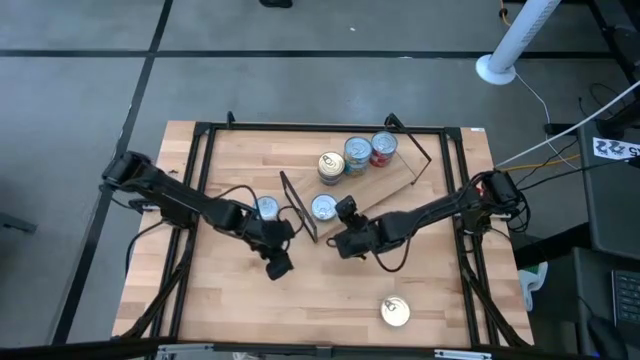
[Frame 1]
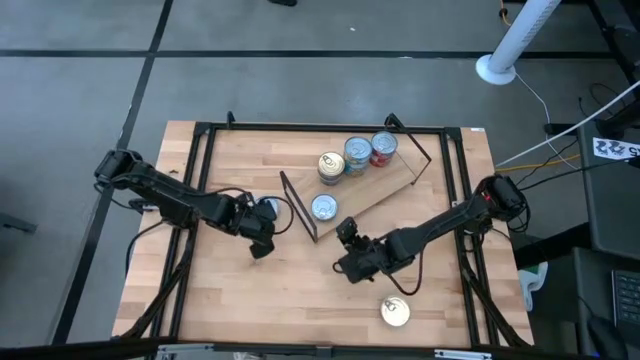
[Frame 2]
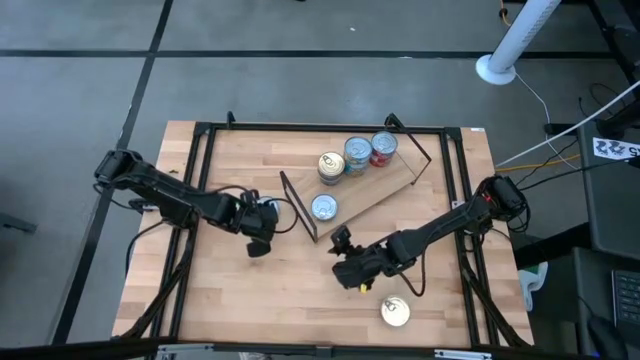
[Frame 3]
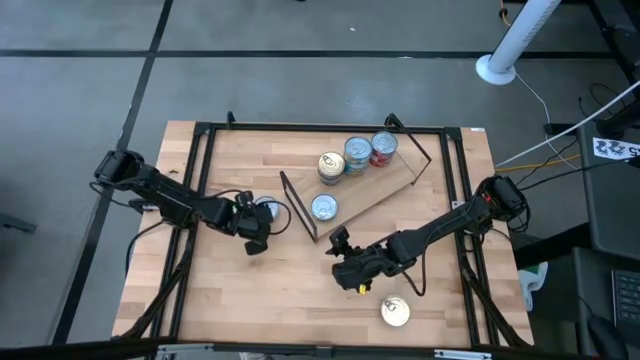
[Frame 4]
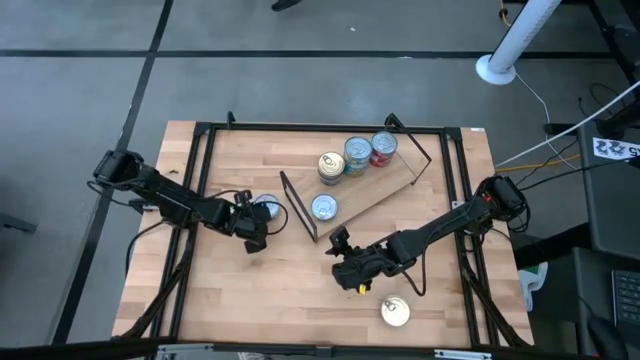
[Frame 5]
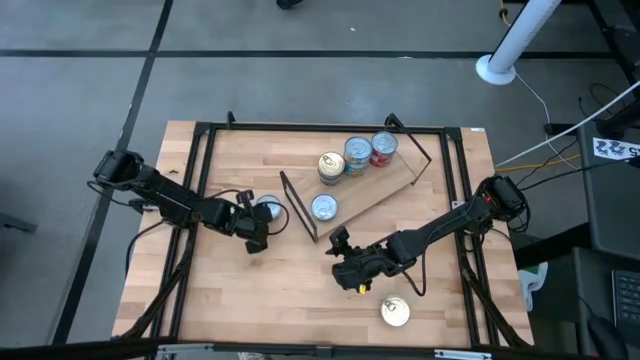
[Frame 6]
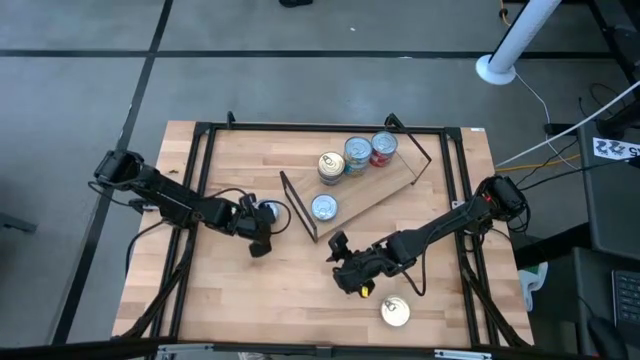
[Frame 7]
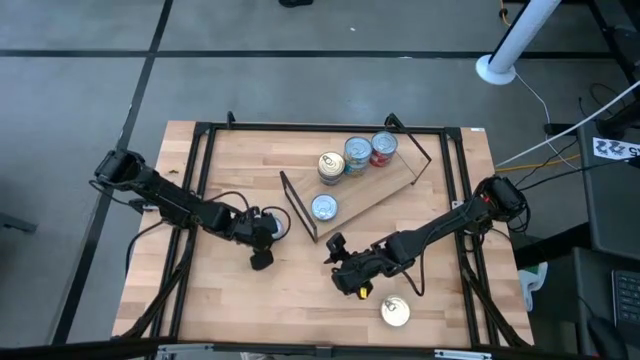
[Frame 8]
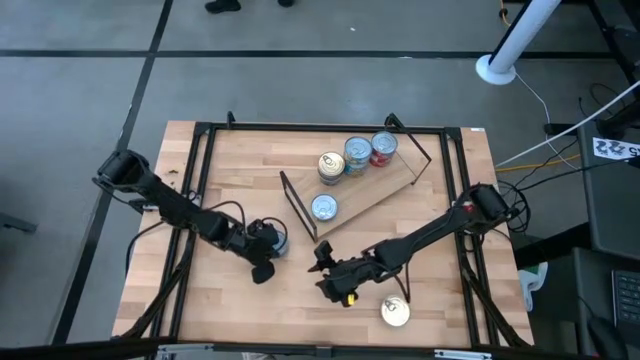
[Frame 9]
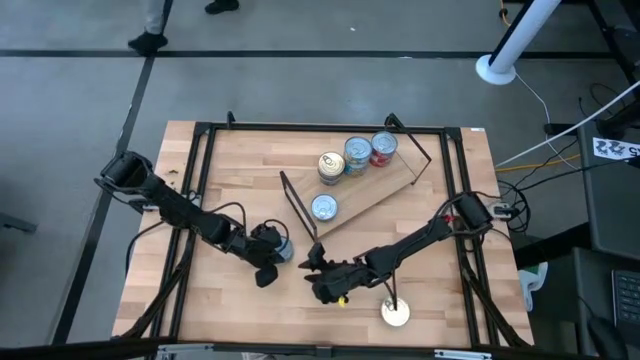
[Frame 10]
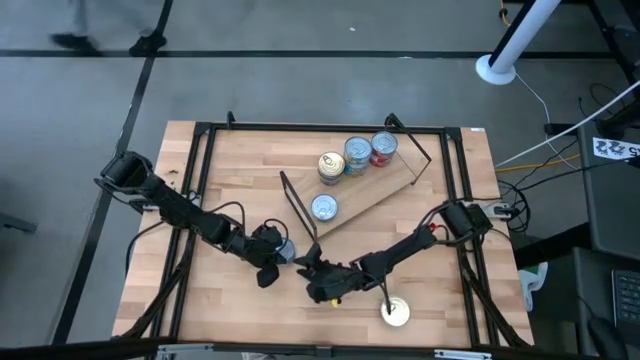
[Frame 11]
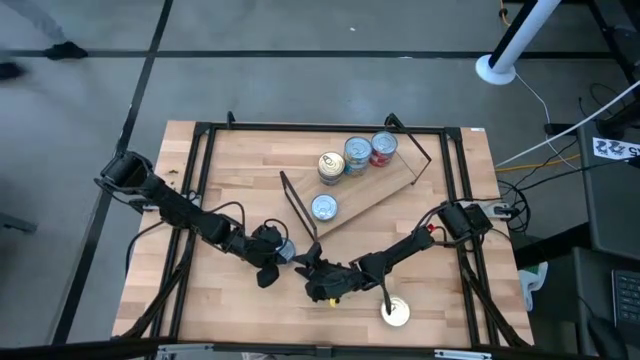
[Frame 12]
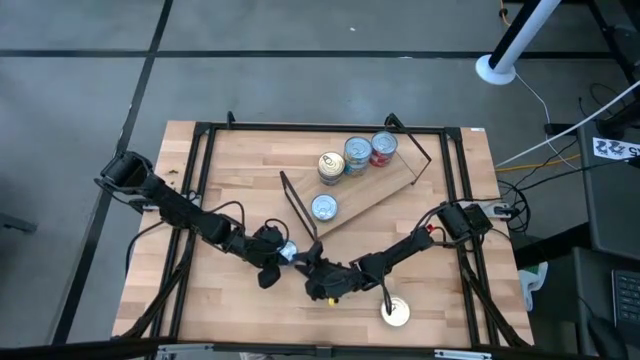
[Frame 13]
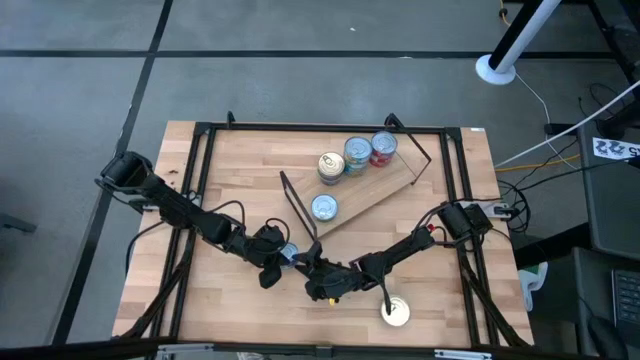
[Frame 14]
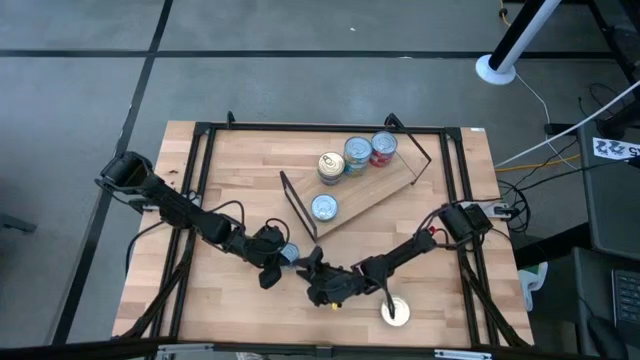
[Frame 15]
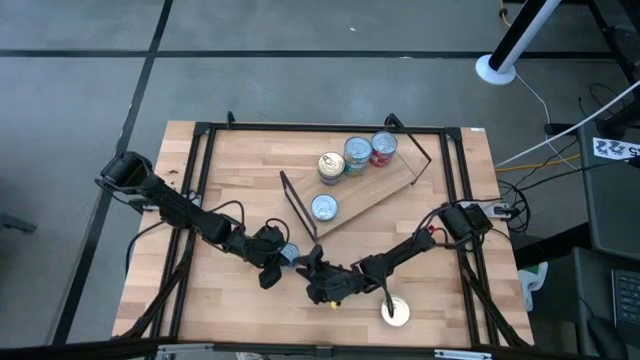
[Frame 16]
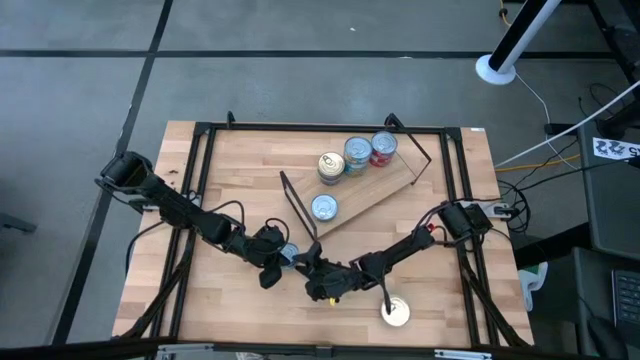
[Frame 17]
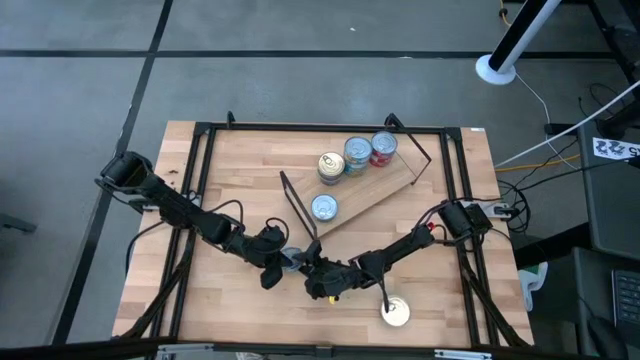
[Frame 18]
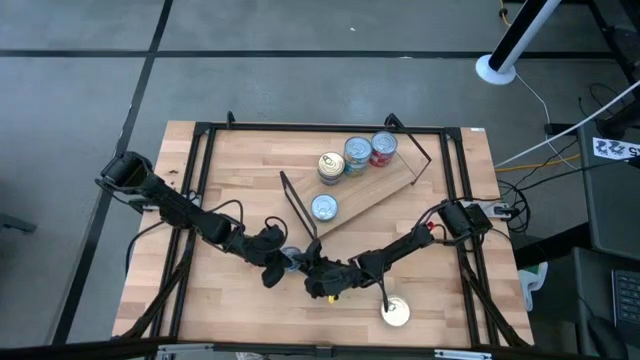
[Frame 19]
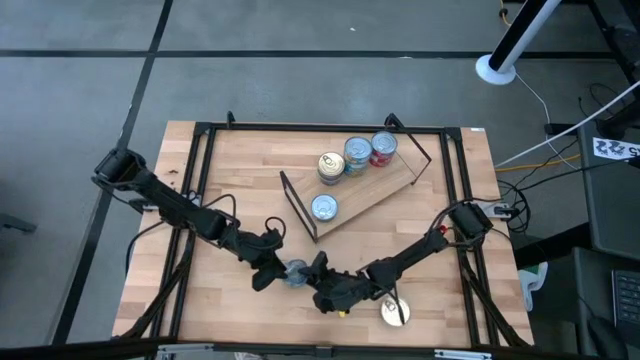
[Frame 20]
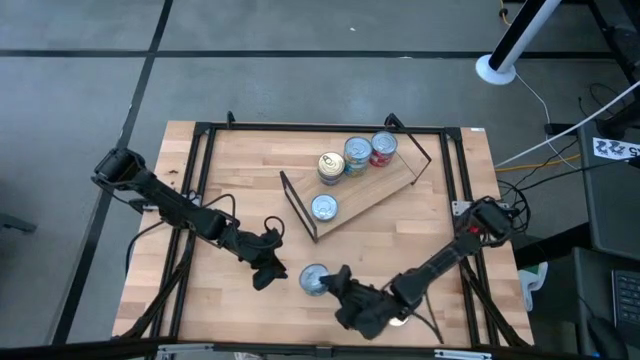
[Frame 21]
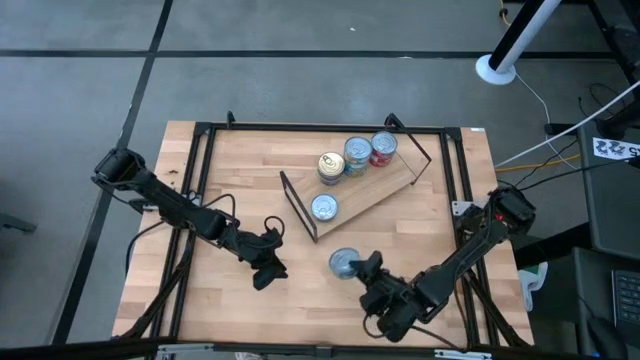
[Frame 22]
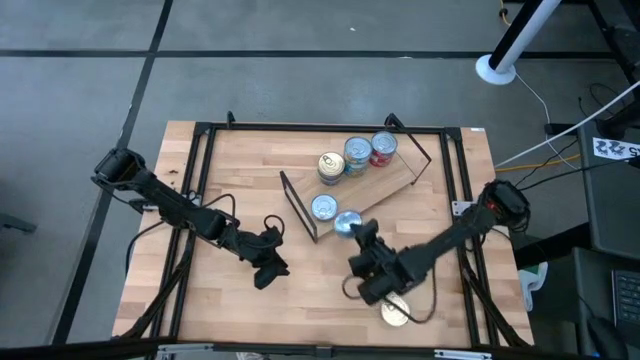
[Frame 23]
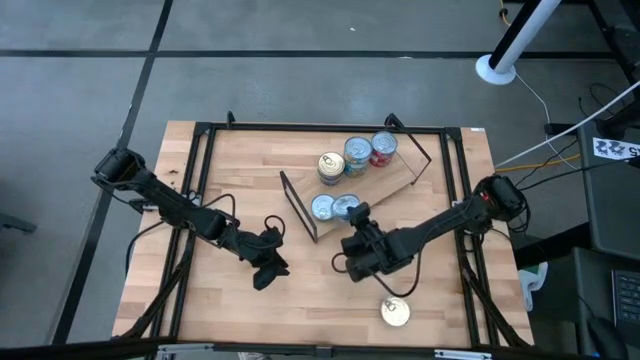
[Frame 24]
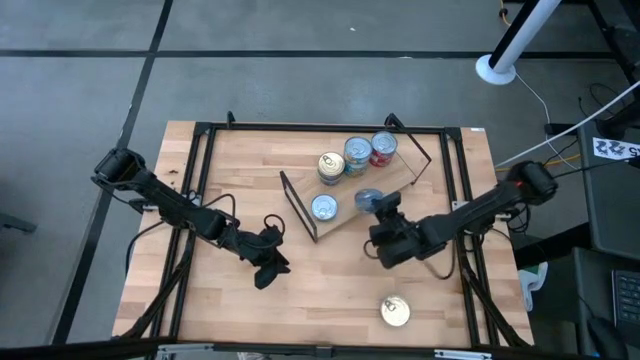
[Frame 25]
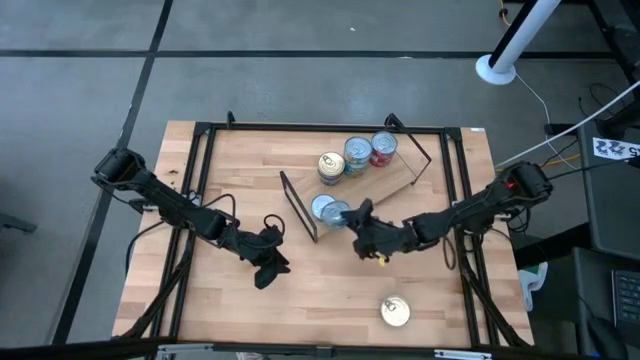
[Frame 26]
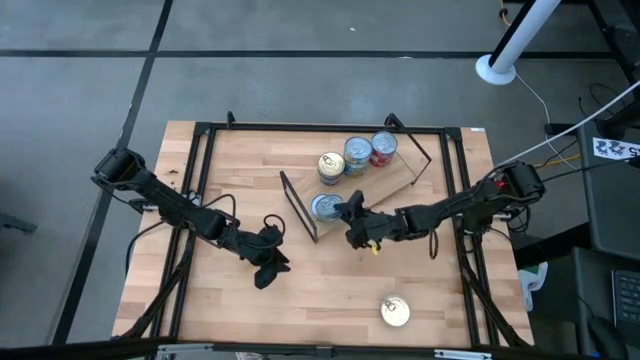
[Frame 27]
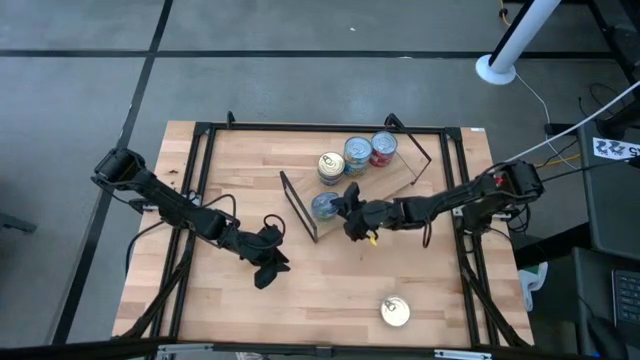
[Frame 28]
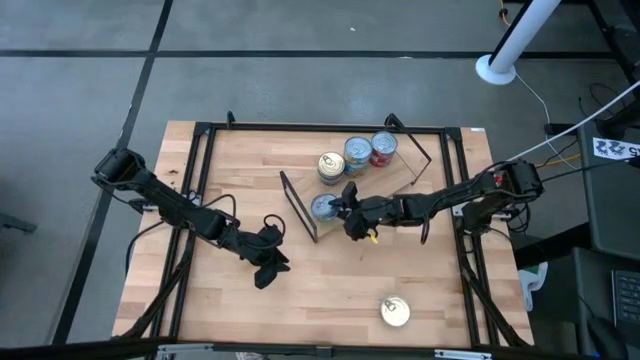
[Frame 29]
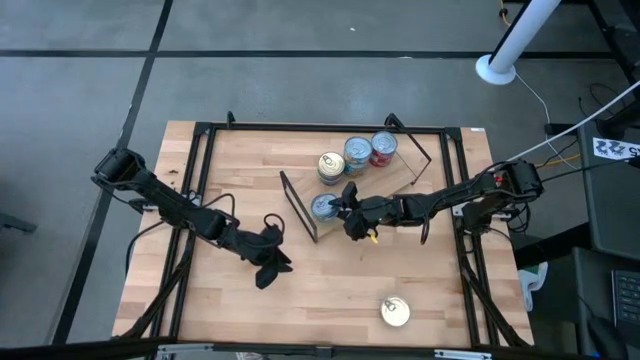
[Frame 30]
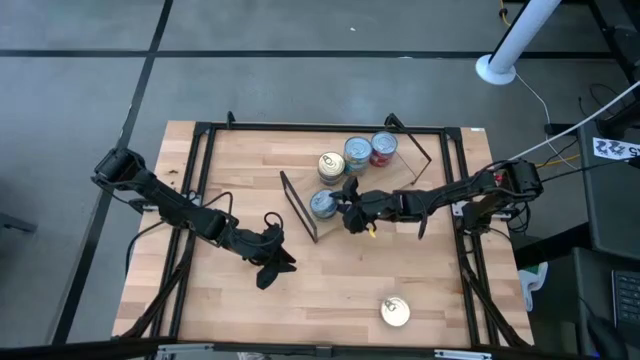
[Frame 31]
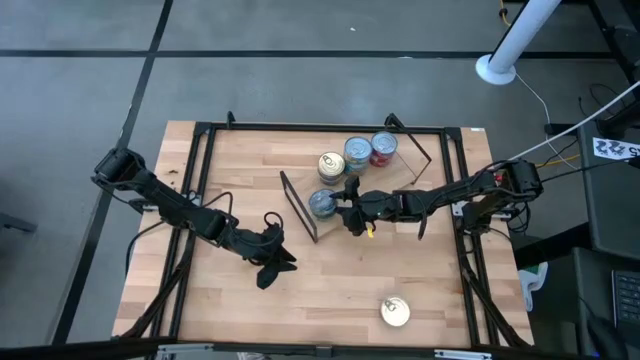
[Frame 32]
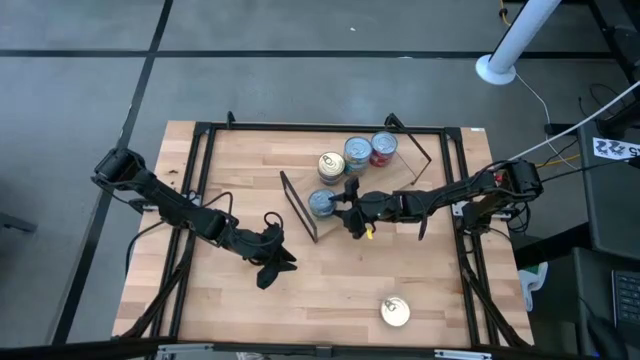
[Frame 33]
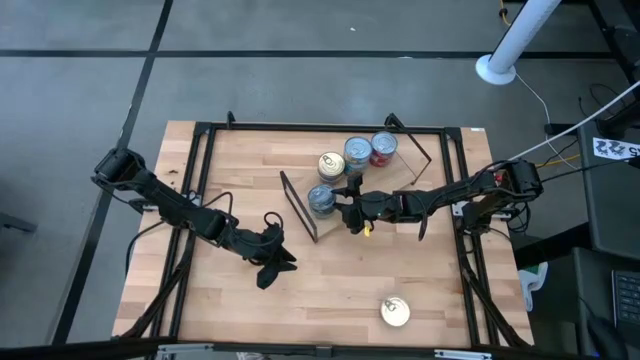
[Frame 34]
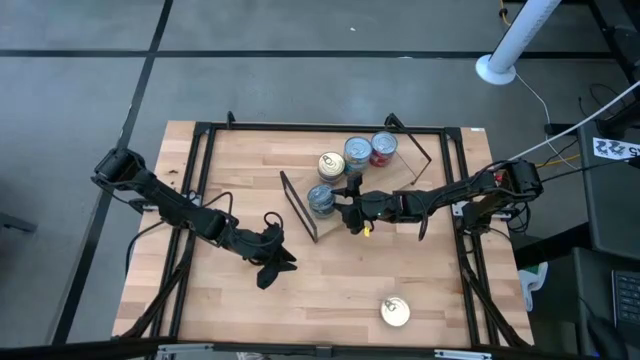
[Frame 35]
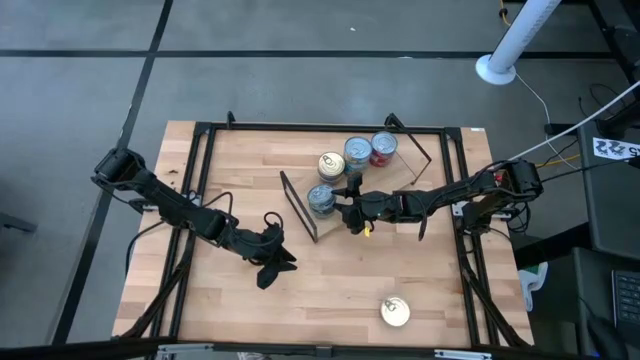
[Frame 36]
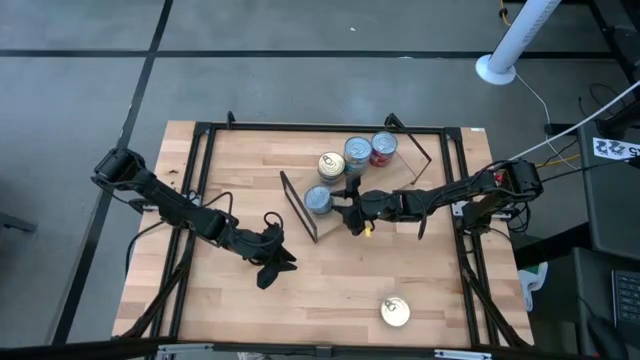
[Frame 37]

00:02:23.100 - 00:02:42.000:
Task: Stack canned seafood by type on shelf
Stack the green tuna can on top of the green tuna can on the shelf

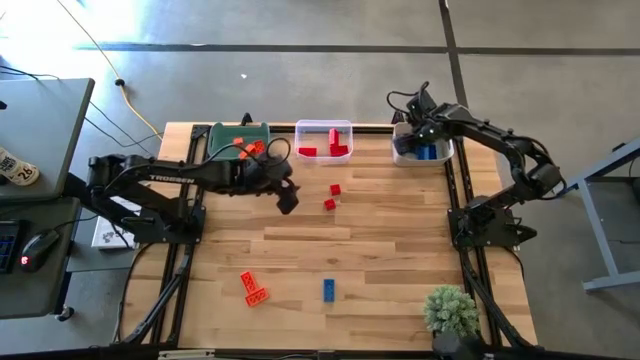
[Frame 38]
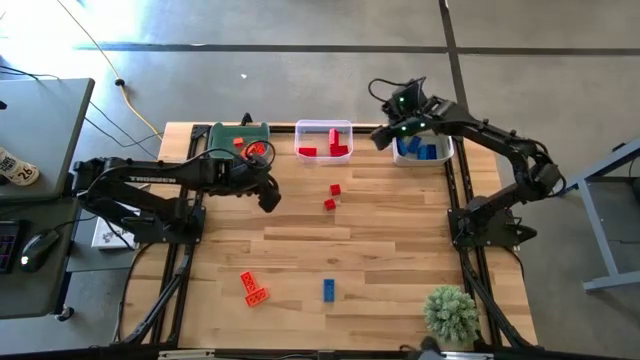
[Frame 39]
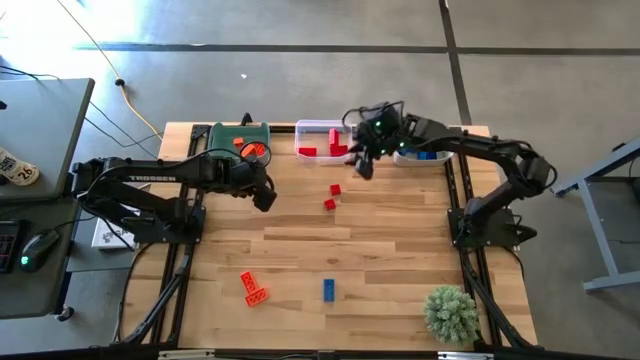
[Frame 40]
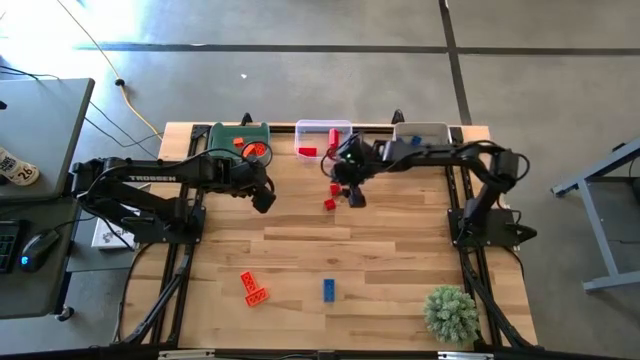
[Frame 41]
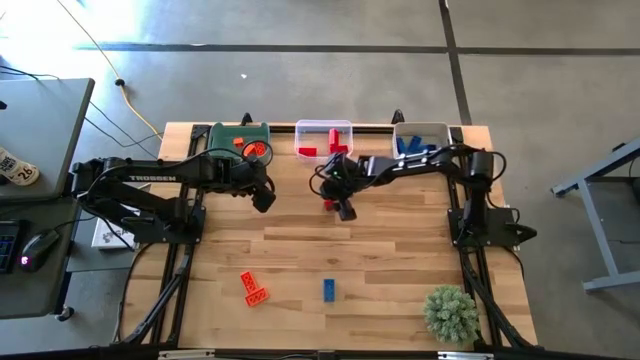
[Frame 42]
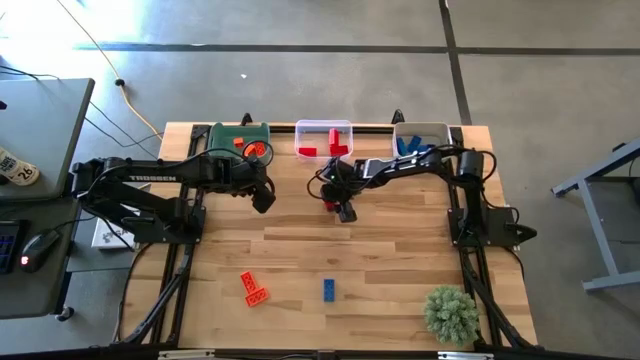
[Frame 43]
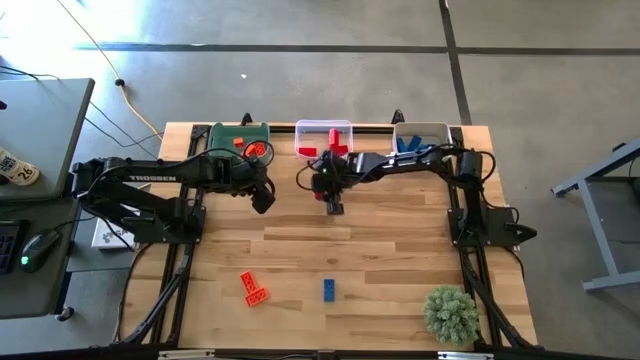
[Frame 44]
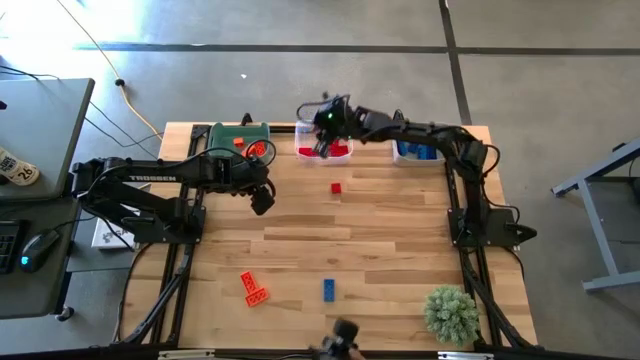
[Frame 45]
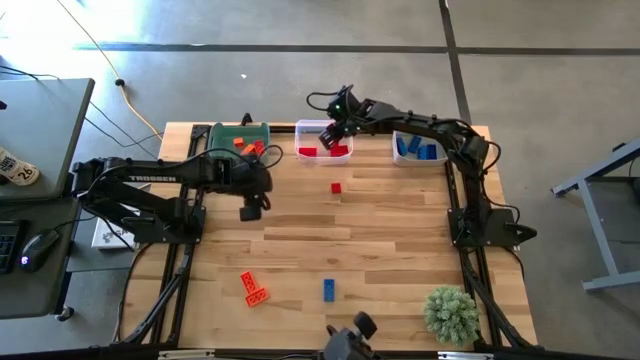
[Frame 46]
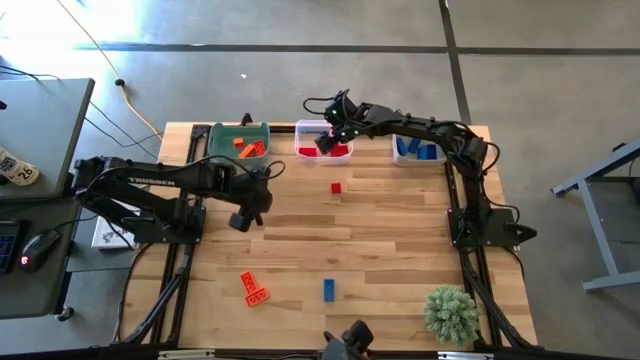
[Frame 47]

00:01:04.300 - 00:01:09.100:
Task: Sort & place blocks by color
Put the red game piece into the transparent bin
